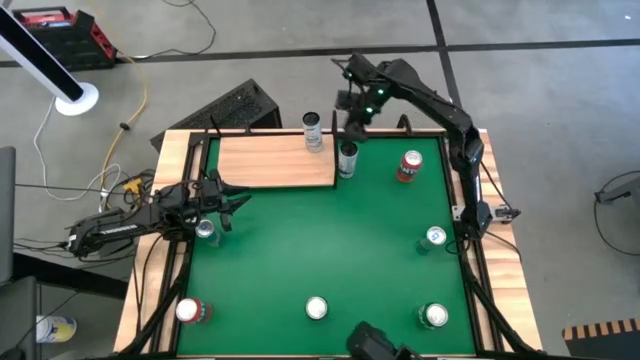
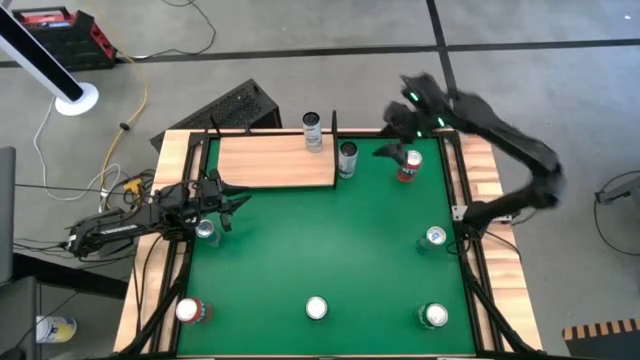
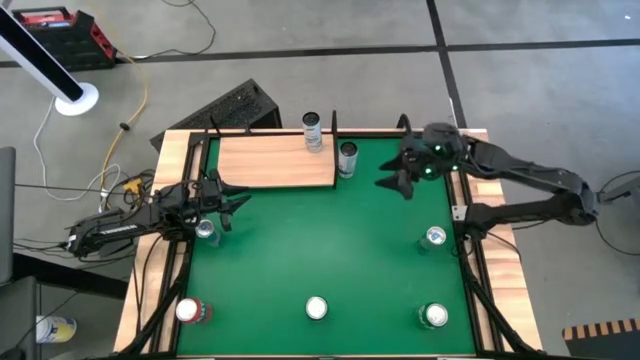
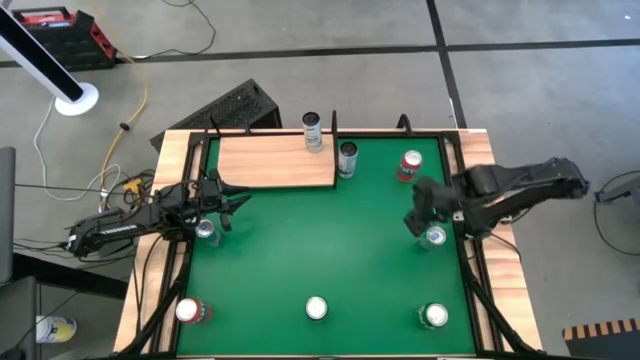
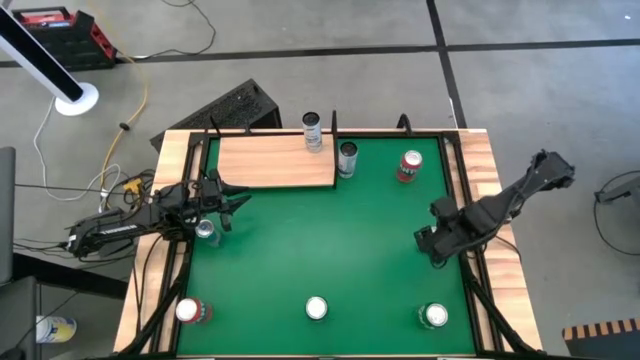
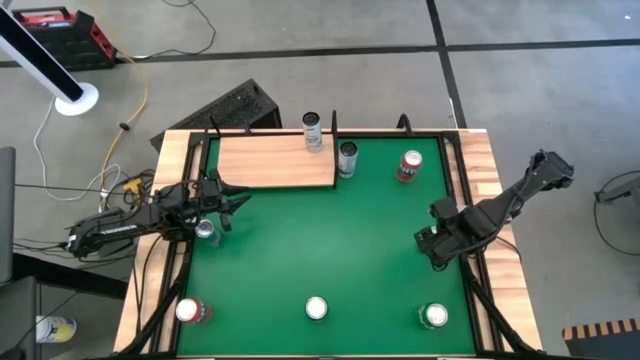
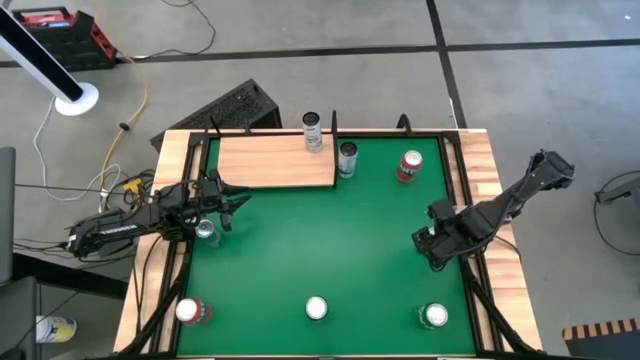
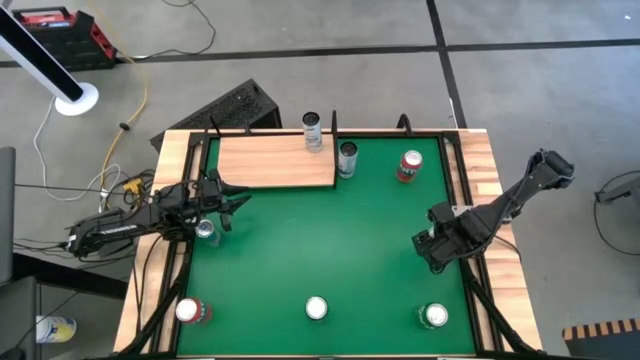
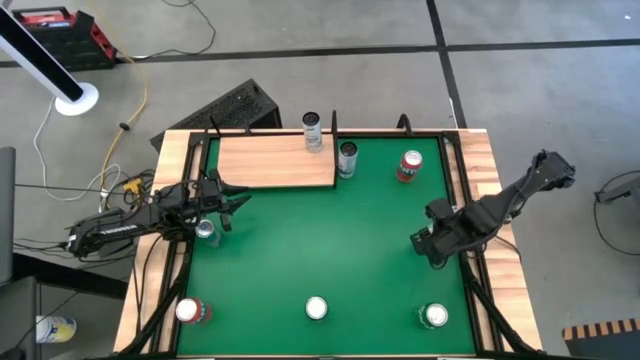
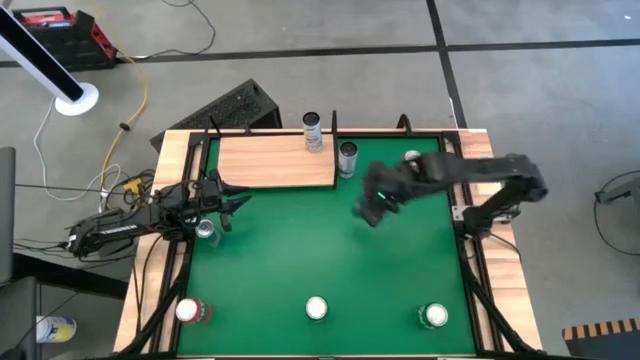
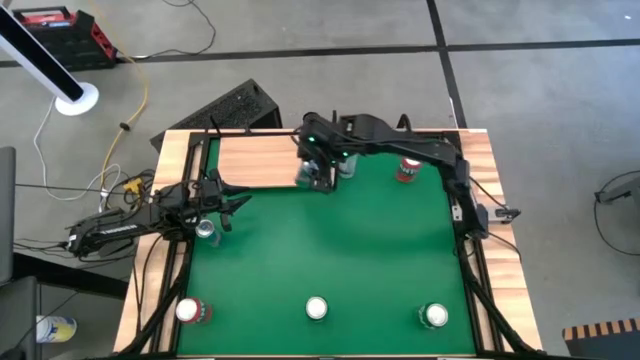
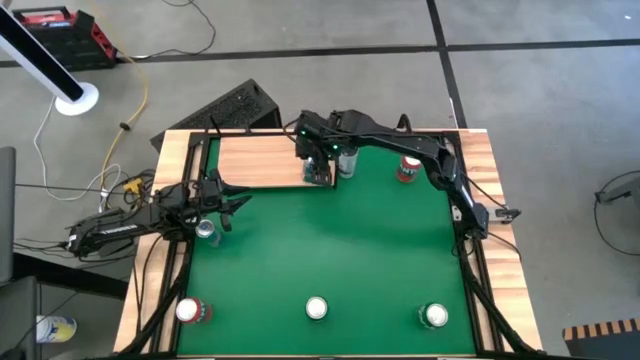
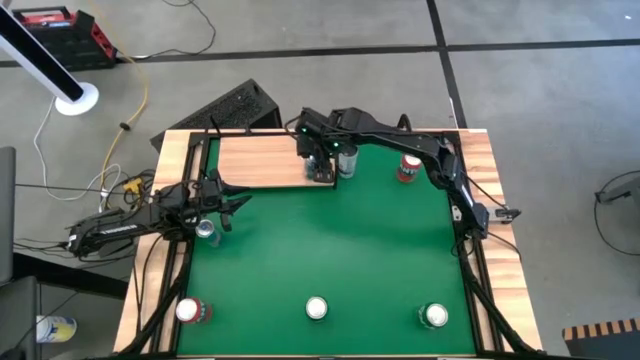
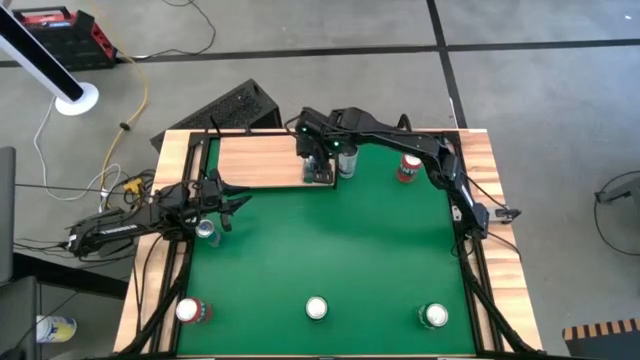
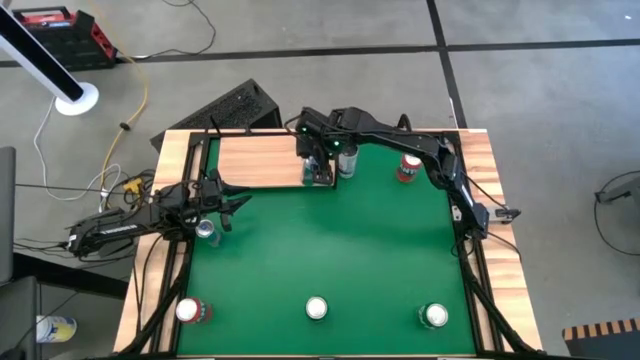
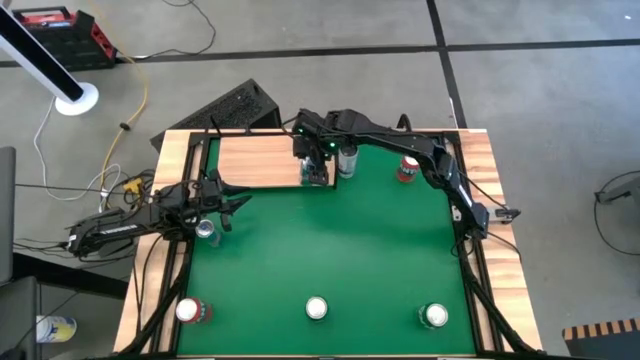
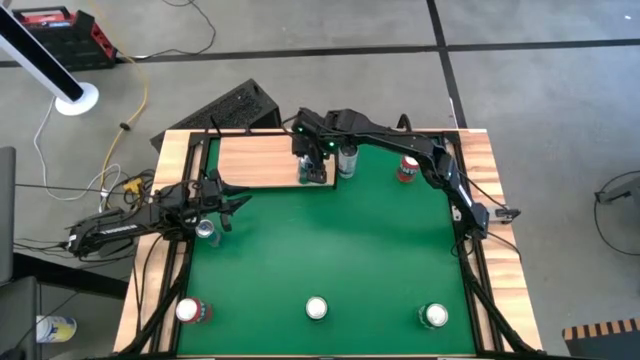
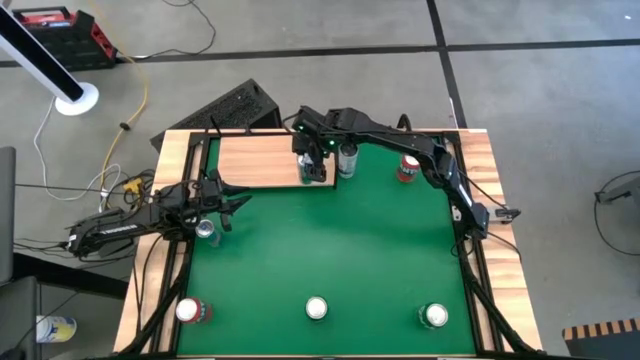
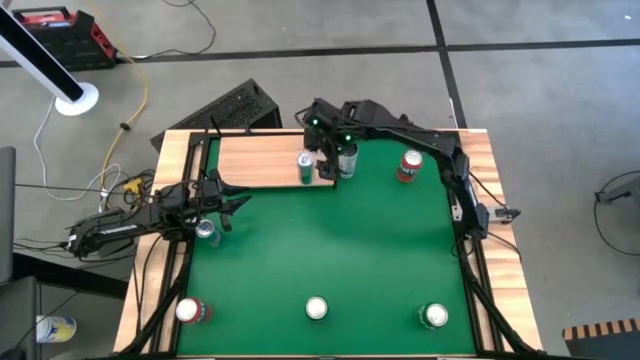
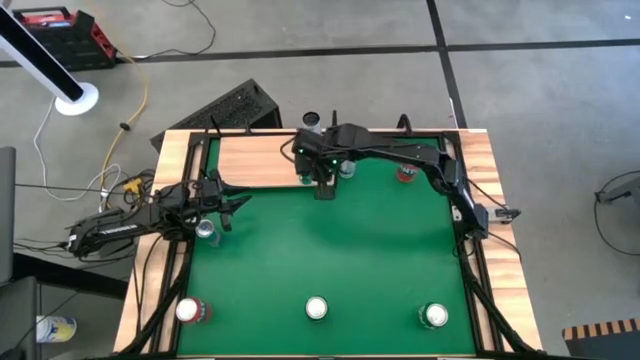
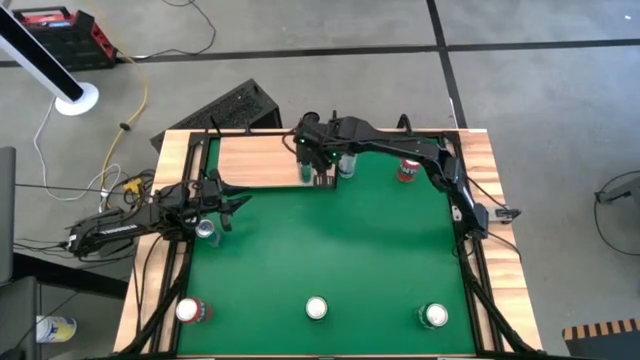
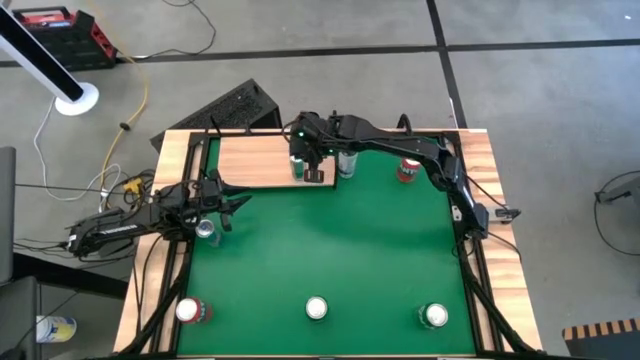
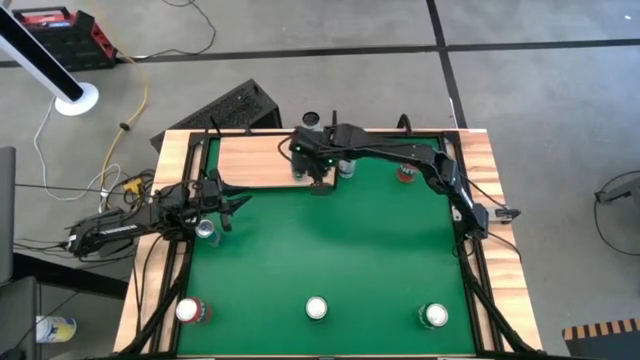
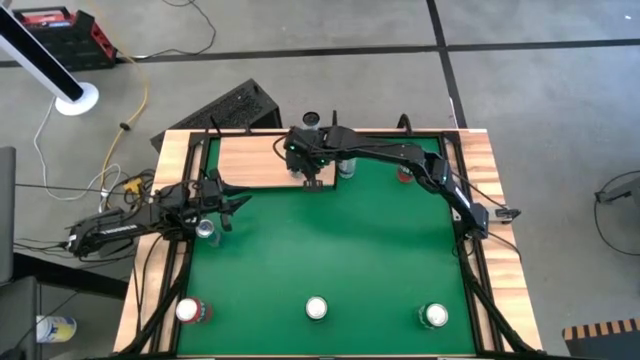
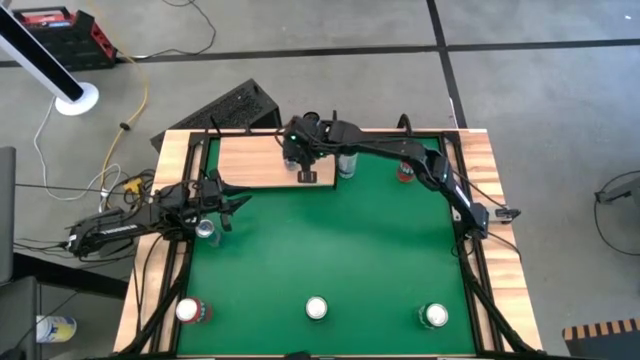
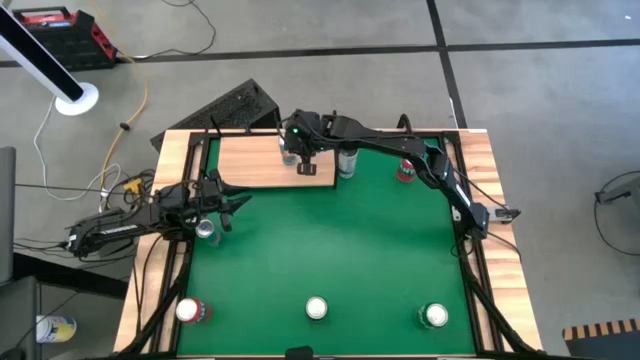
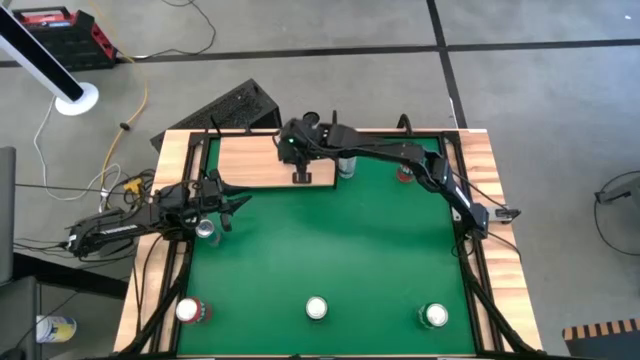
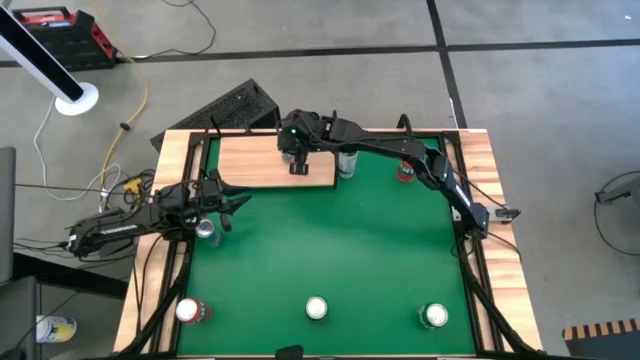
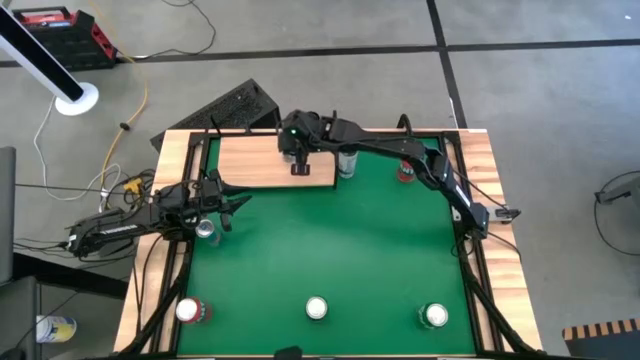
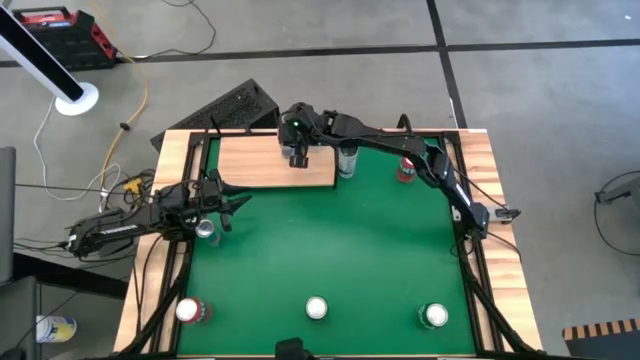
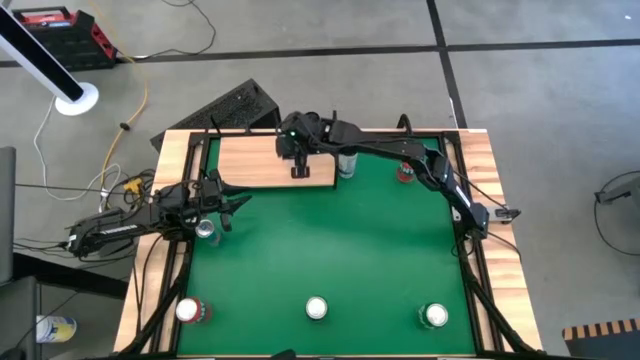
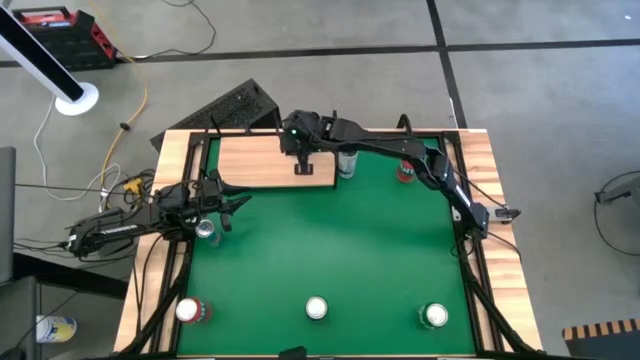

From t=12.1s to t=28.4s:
Task: Place canned beverage on shelf
Put the right blue soda can on the shelf
